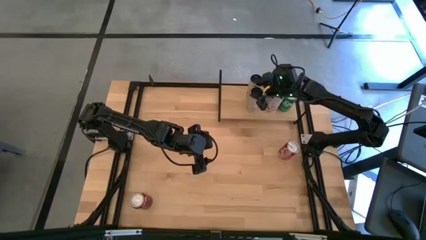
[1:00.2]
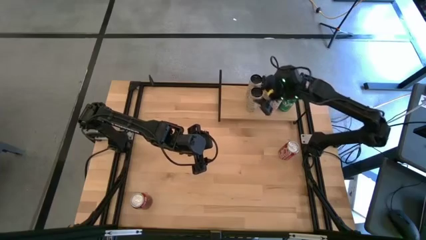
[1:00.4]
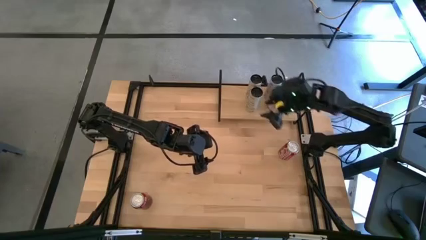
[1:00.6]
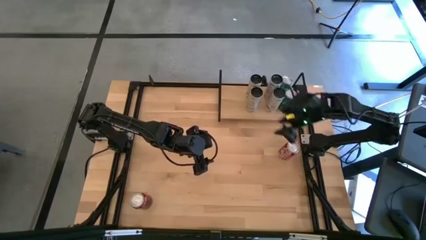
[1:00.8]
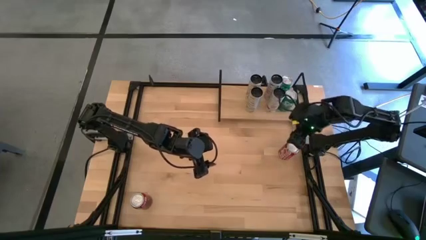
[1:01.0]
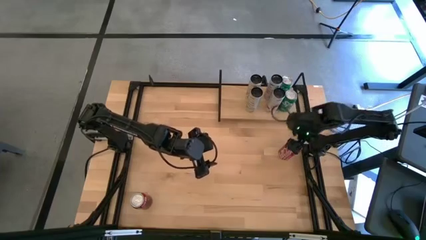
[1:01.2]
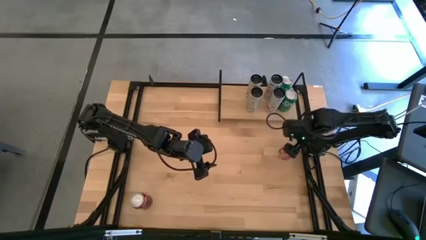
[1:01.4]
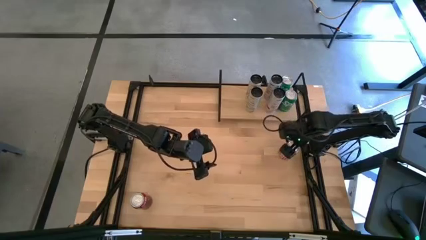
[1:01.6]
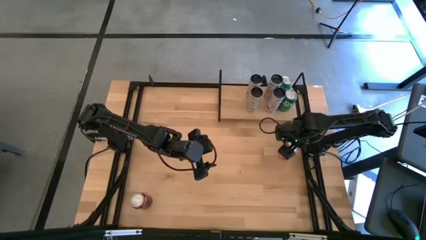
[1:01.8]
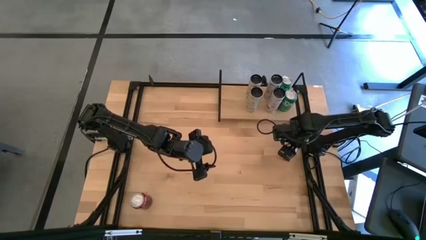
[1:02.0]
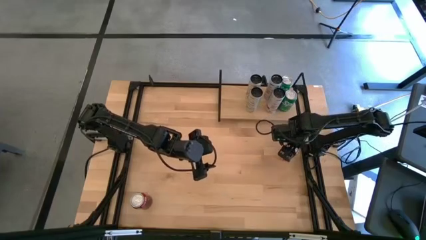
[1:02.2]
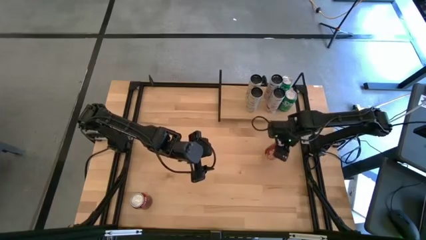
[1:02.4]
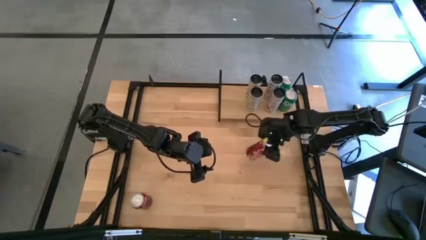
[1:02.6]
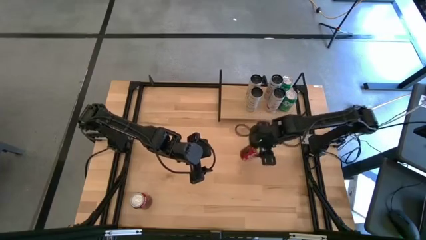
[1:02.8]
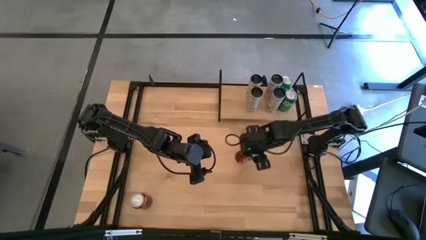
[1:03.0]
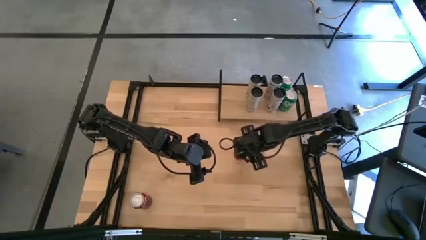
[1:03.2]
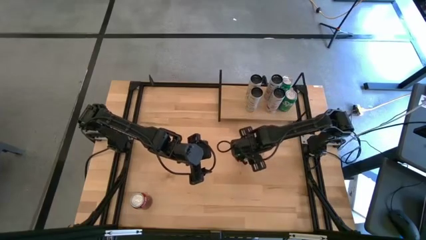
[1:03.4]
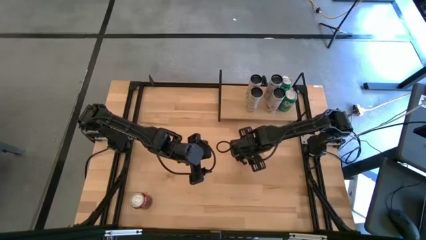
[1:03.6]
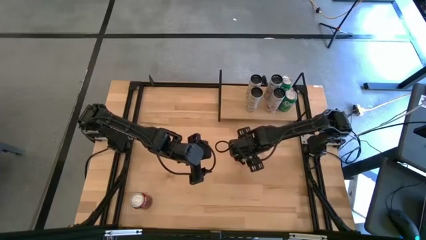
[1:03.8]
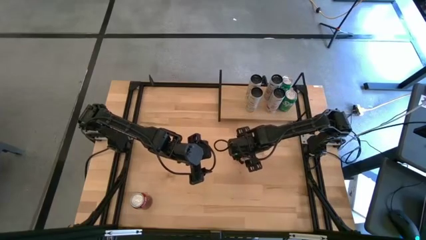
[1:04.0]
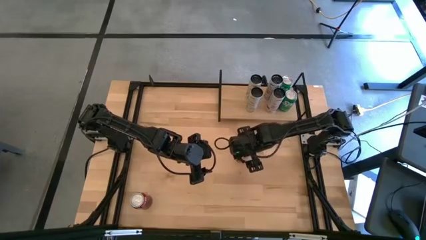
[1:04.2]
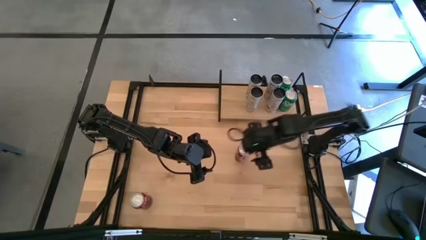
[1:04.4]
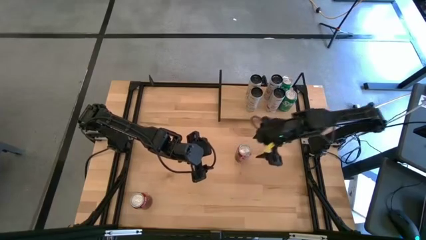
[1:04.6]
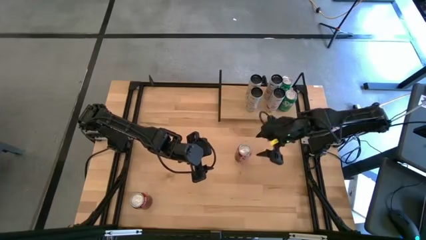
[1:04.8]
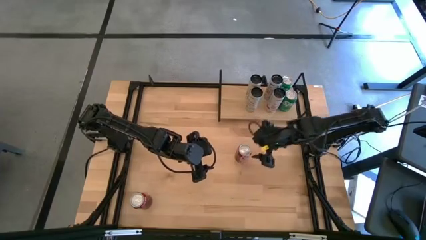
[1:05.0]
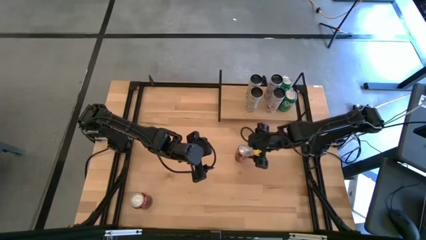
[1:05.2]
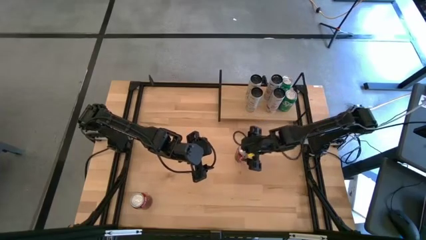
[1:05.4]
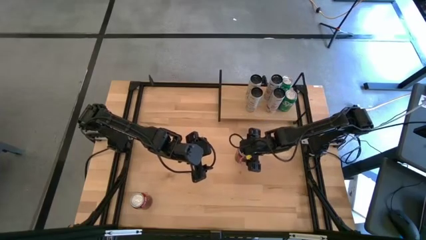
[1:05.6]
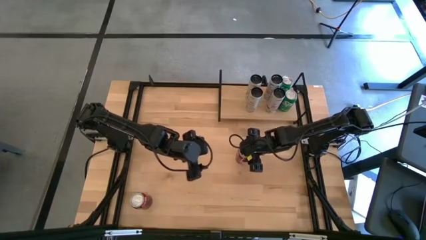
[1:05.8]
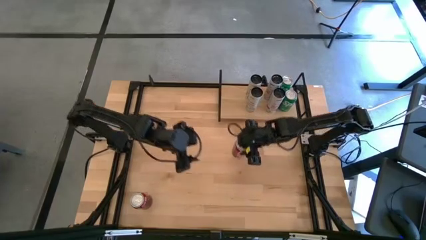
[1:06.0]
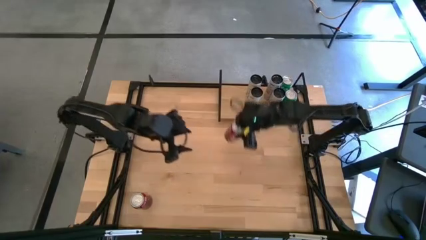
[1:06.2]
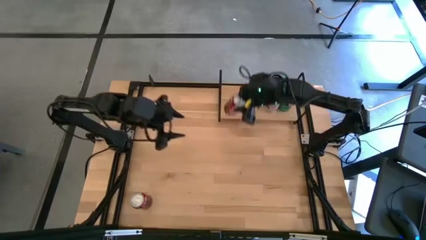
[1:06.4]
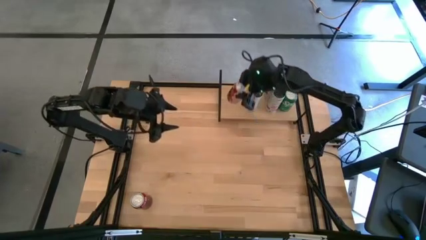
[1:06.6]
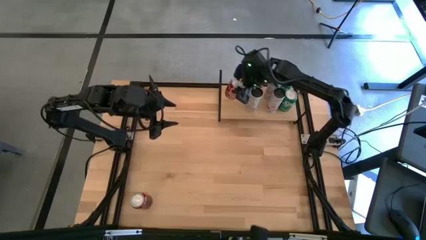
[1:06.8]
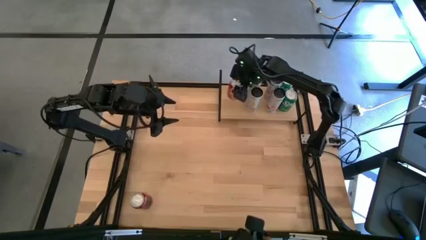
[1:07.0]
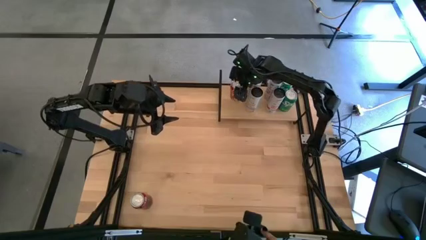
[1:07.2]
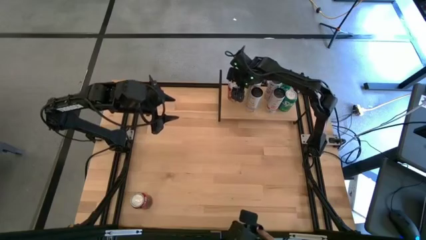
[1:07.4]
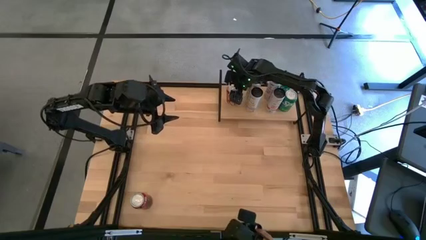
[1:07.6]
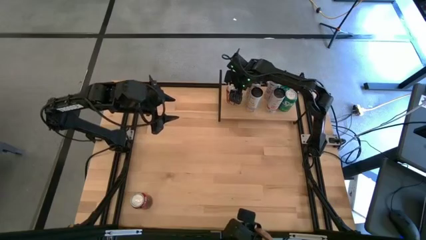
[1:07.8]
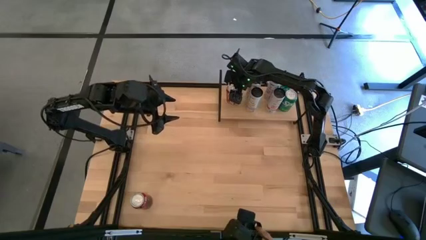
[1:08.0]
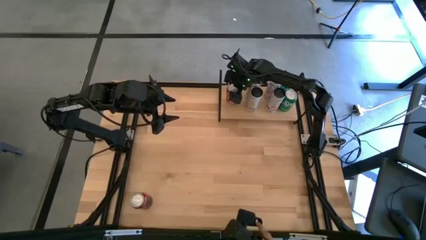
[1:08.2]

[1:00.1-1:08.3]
Task: Place canned beverage on shelf
Put the top red soda can on the shelf

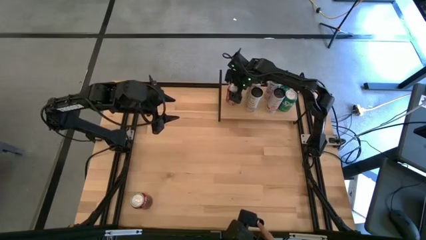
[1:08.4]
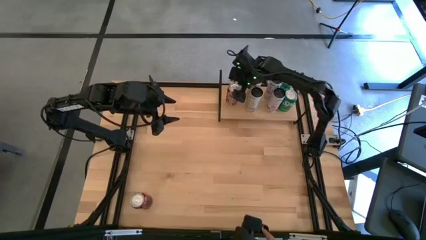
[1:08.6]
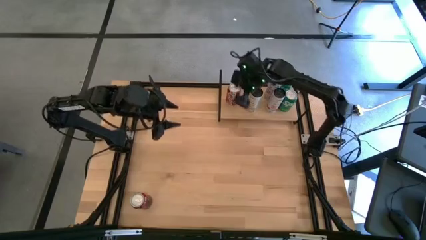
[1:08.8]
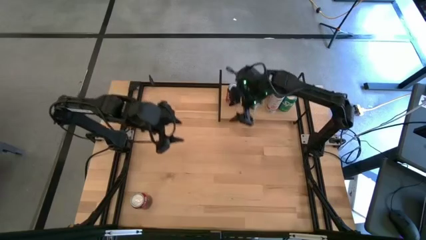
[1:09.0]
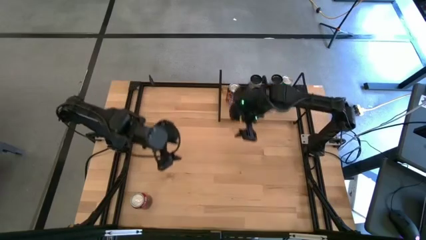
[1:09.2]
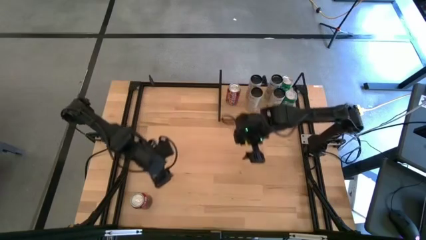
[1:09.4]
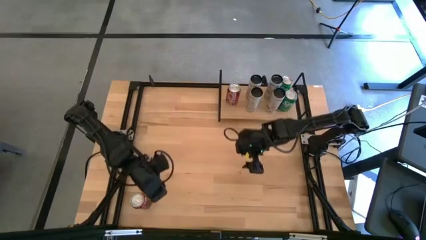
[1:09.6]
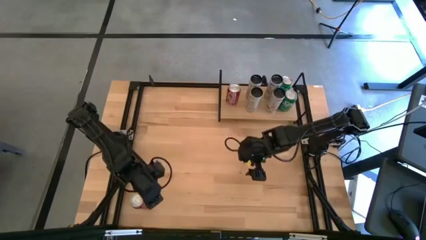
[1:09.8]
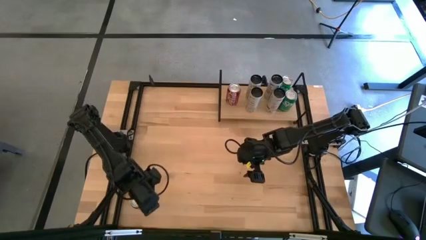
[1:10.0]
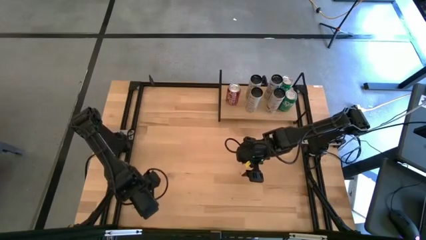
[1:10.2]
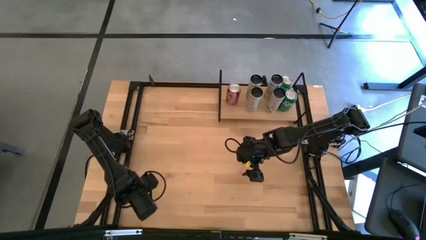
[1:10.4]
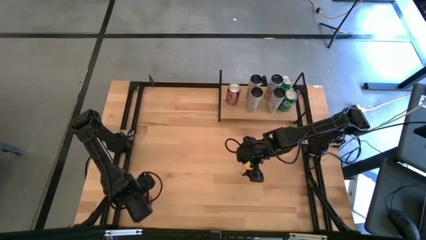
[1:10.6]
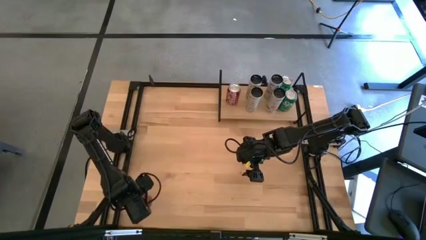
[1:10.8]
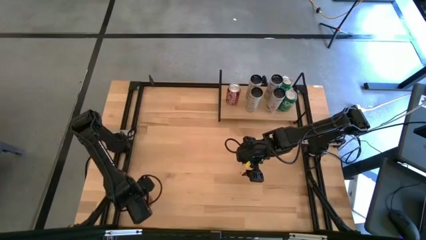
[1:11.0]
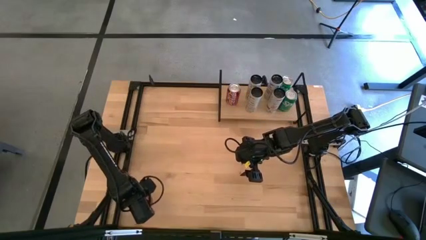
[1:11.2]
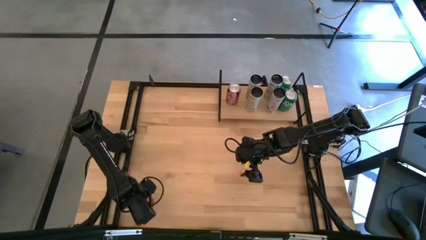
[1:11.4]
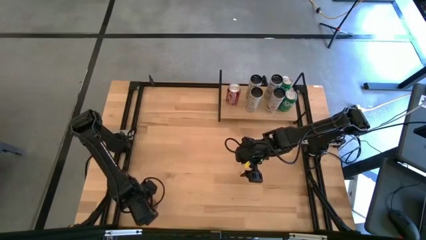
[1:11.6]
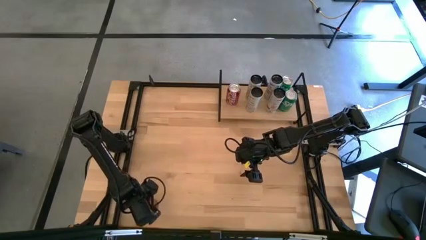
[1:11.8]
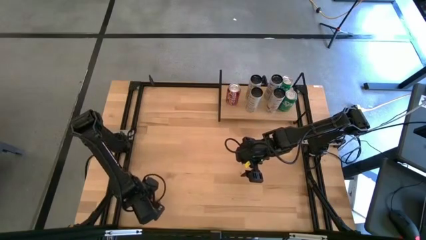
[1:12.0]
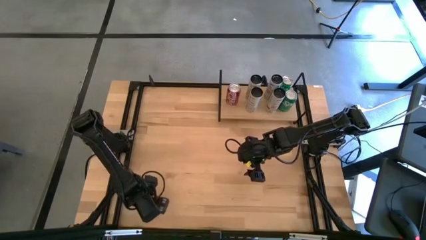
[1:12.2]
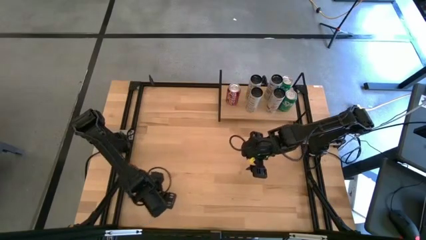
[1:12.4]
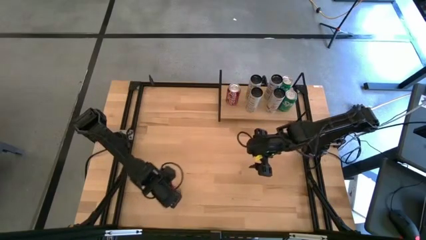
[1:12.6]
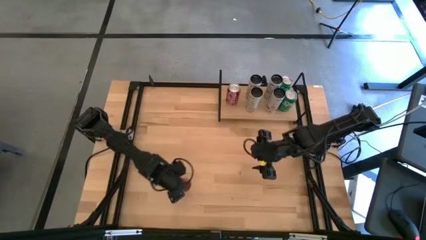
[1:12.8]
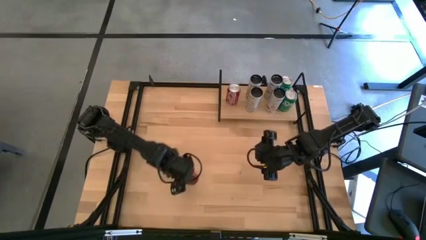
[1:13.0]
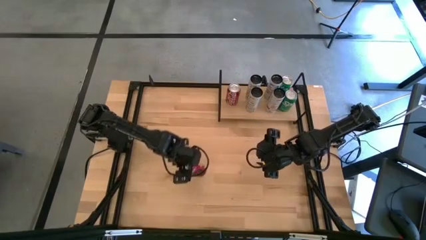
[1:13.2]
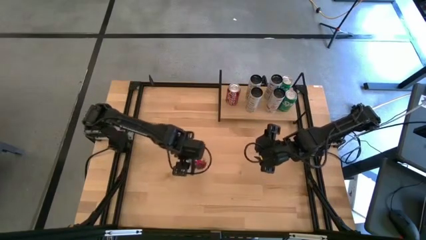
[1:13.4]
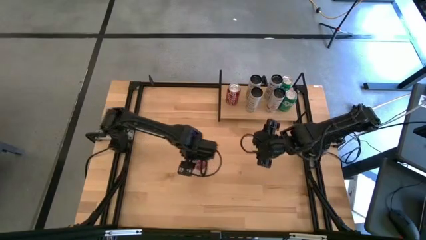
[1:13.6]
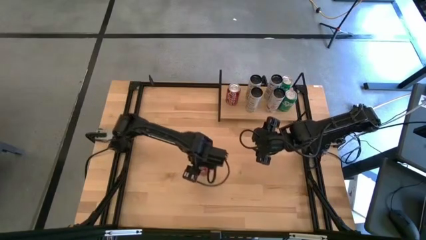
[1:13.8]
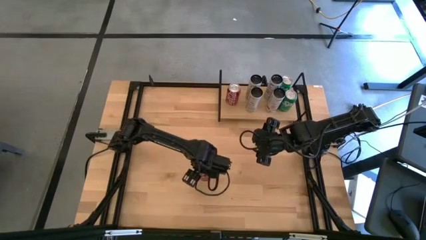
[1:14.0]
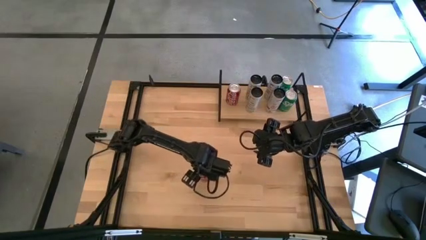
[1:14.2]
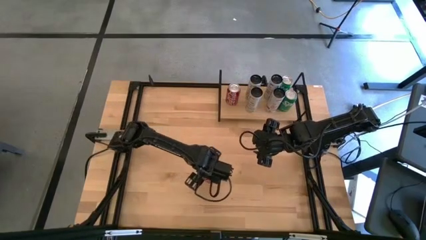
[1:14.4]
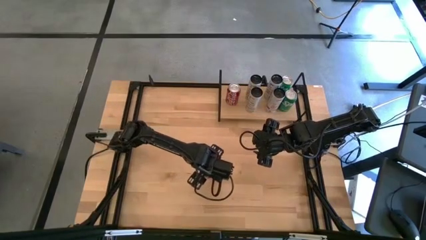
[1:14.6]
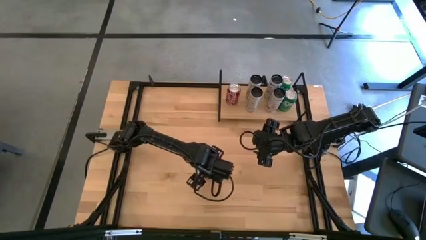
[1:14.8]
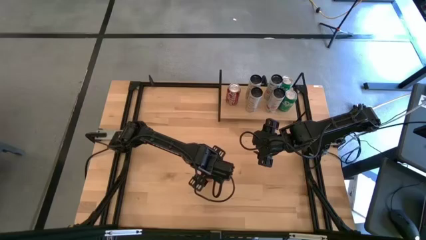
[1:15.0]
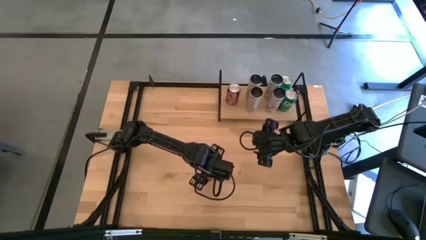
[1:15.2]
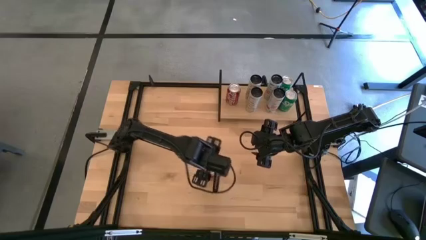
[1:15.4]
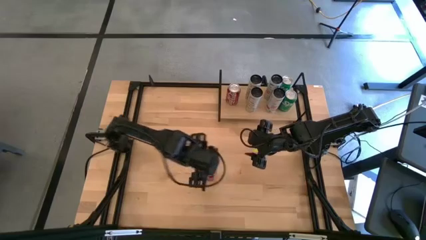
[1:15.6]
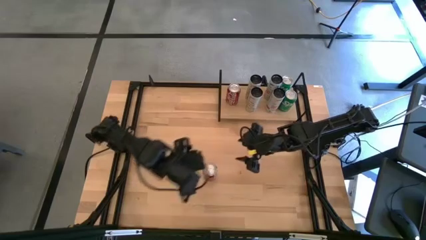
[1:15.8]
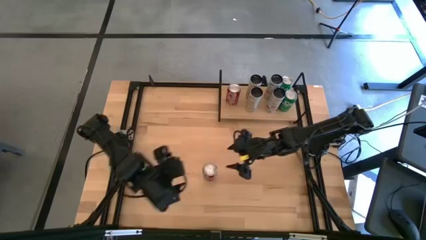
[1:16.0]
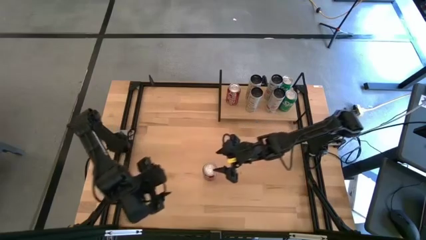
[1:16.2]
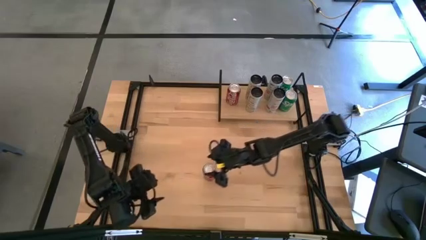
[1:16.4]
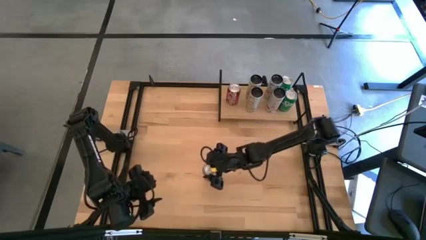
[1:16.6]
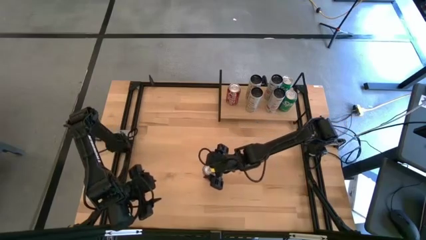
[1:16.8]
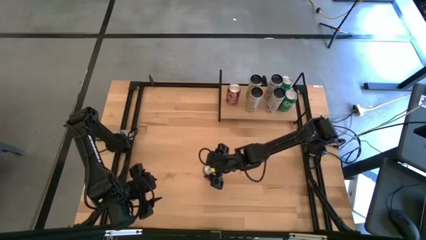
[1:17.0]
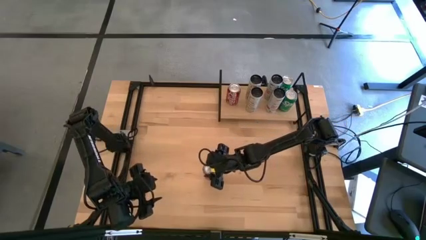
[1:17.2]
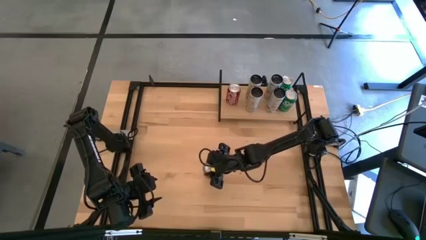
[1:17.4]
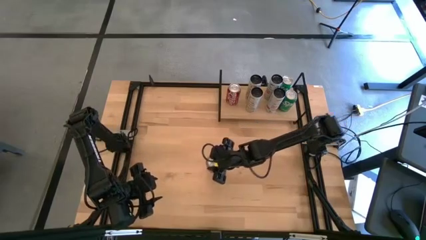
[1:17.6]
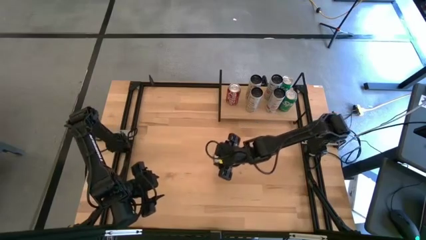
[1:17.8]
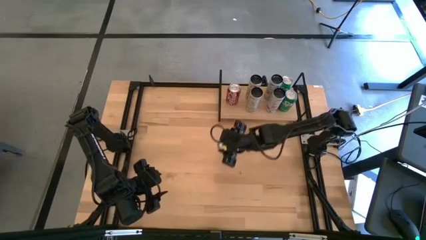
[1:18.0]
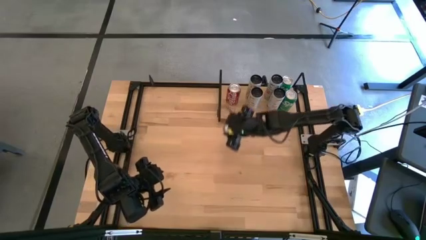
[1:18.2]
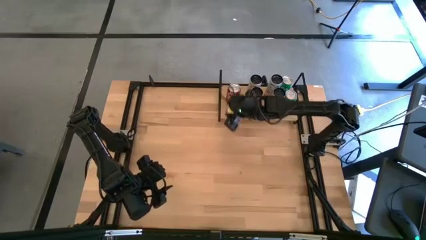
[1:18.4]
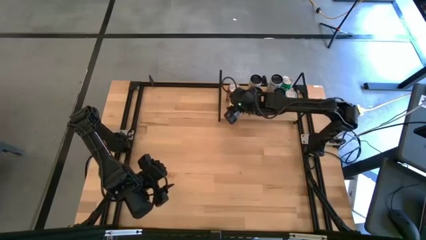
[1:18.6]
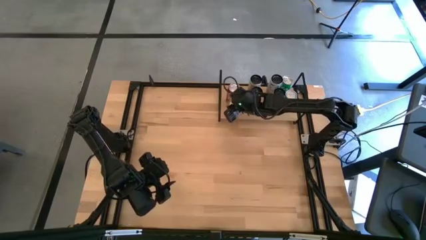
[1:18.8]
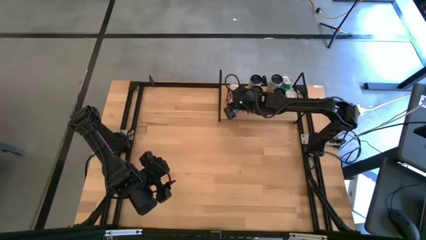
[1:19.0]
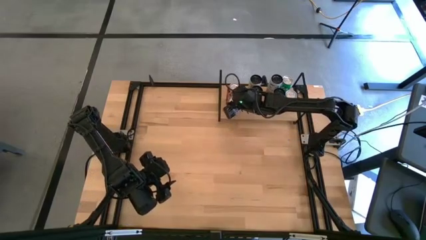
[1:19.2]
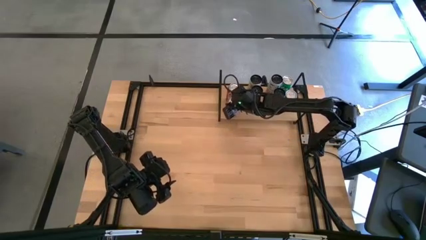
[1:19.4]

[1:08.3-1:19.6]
Put the red soda can on the shelf aligned with the other red soda can
